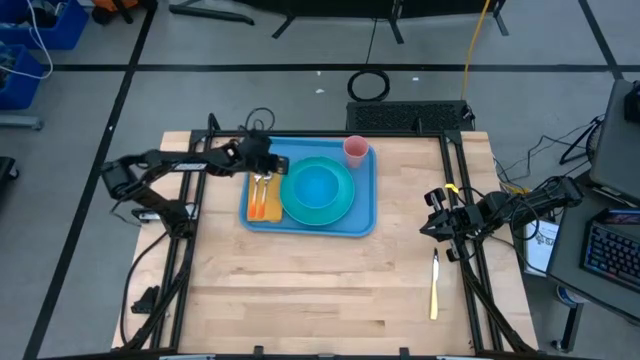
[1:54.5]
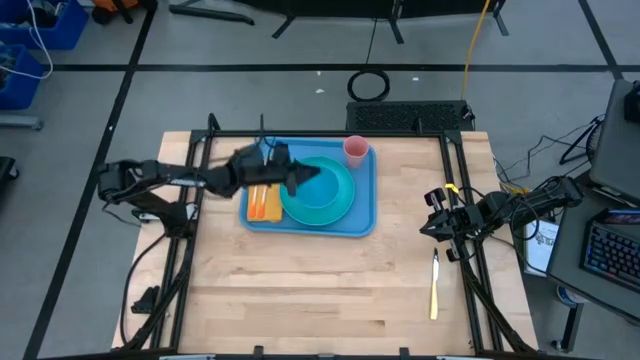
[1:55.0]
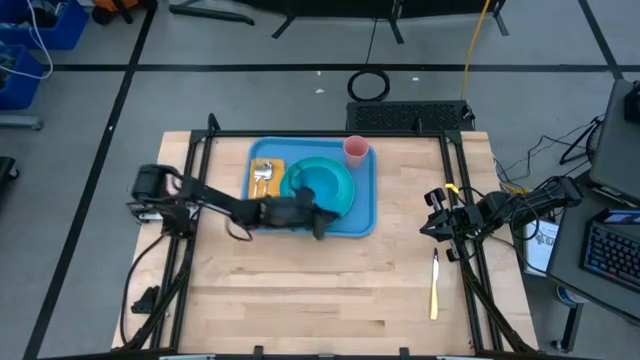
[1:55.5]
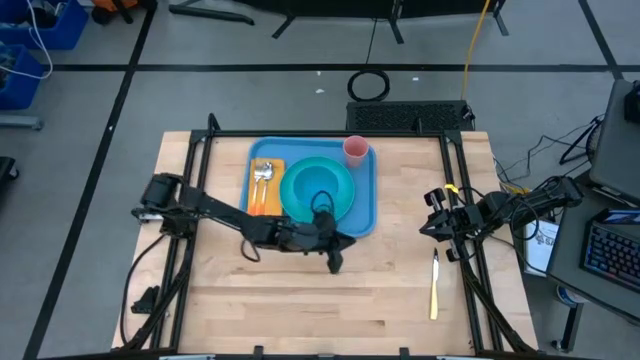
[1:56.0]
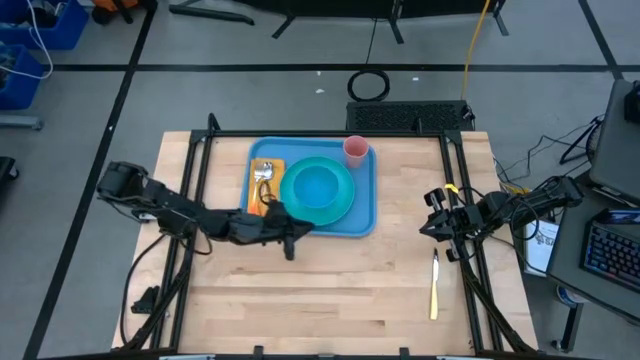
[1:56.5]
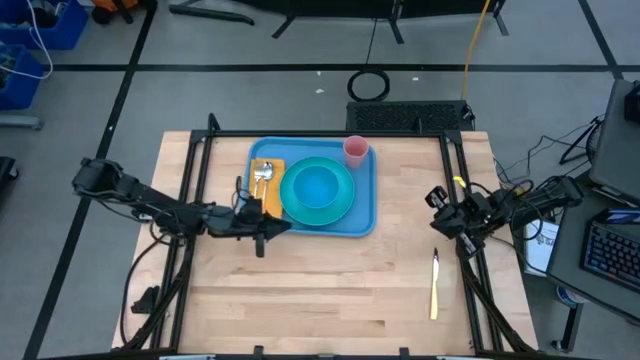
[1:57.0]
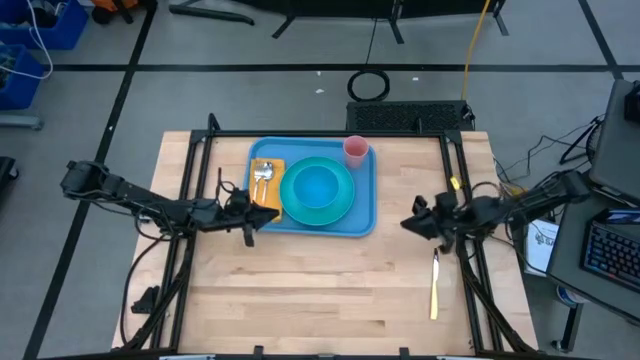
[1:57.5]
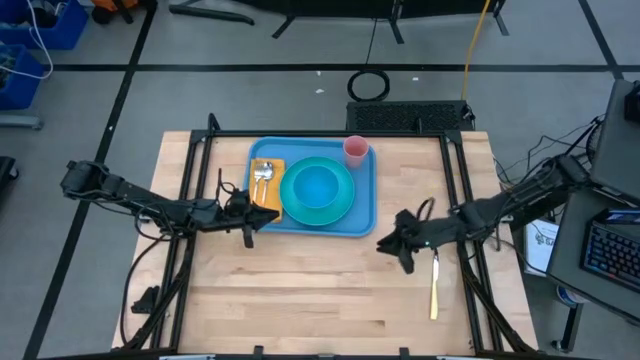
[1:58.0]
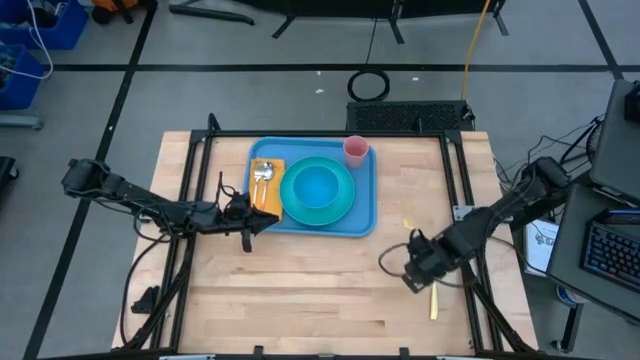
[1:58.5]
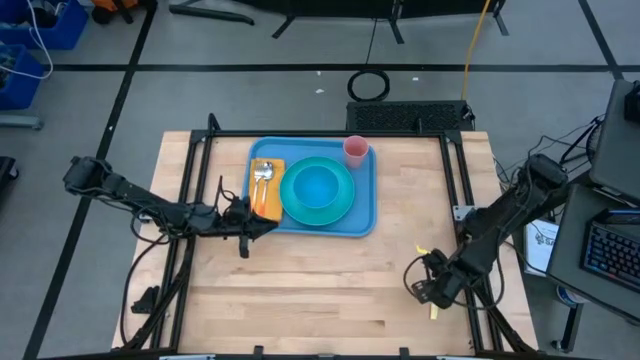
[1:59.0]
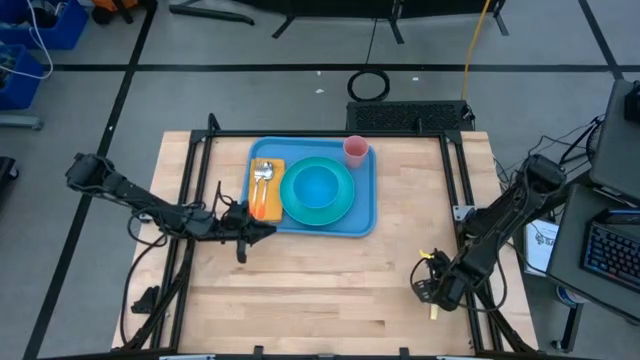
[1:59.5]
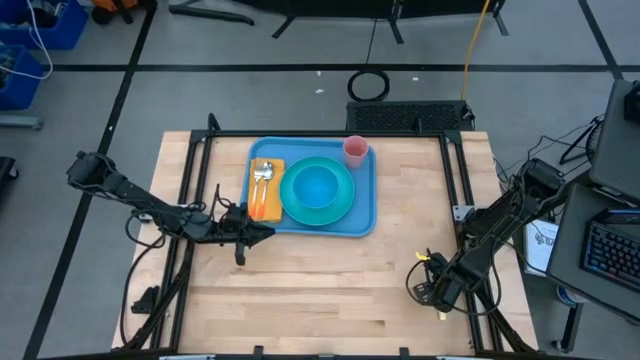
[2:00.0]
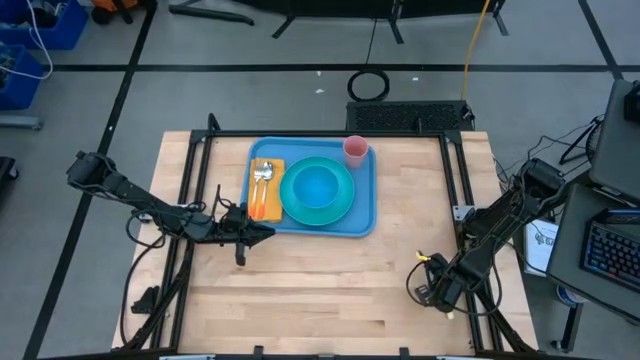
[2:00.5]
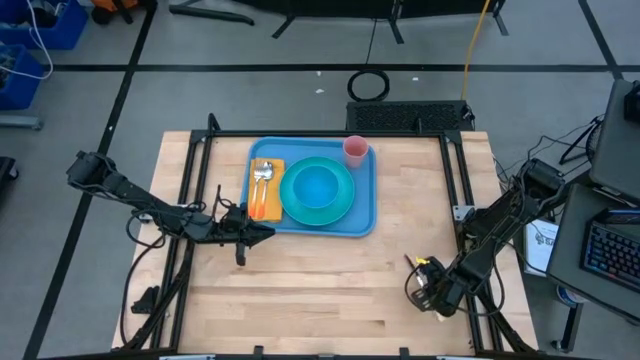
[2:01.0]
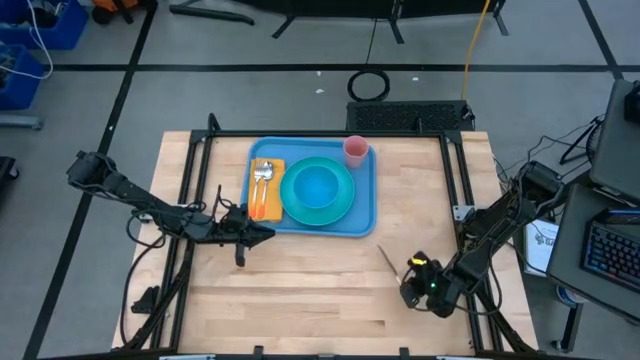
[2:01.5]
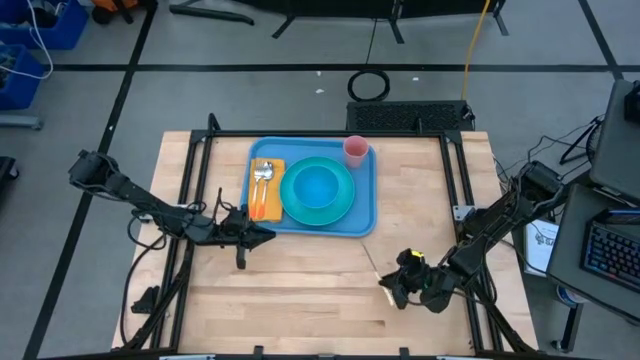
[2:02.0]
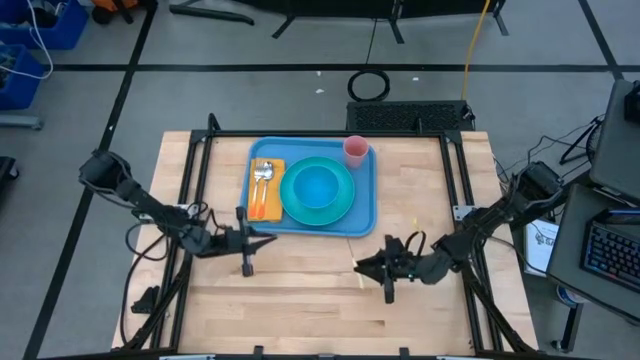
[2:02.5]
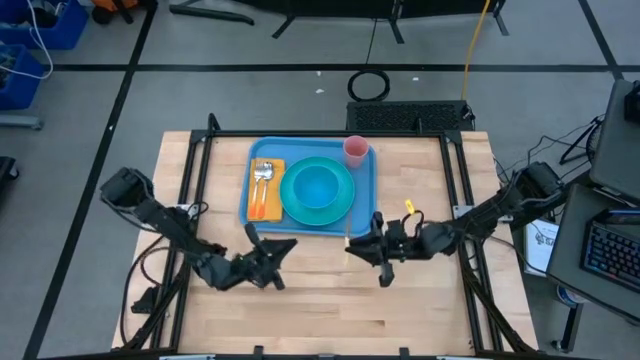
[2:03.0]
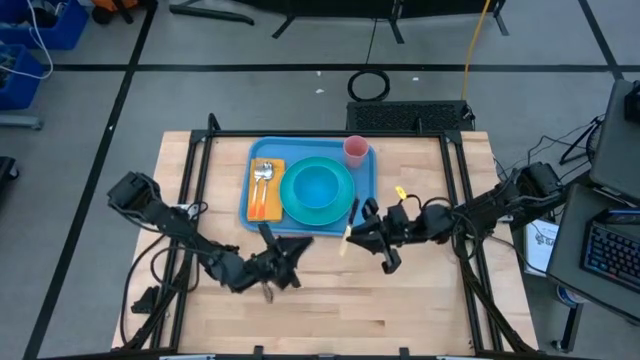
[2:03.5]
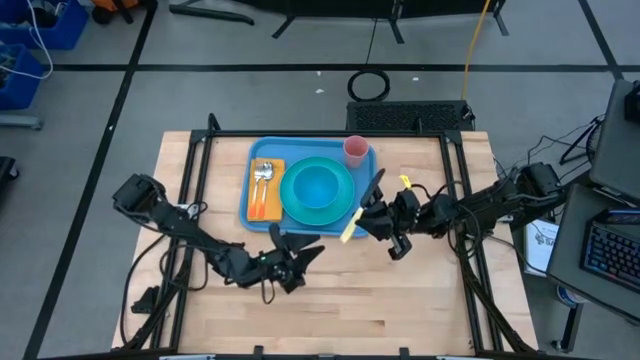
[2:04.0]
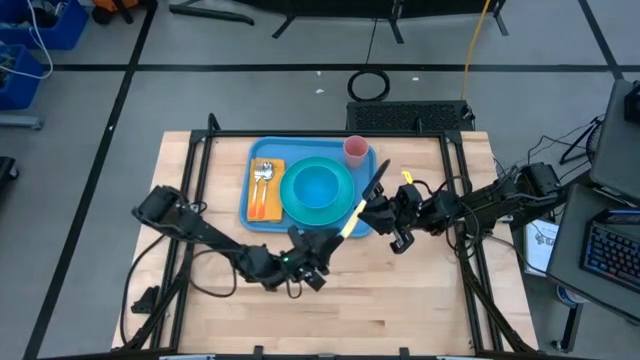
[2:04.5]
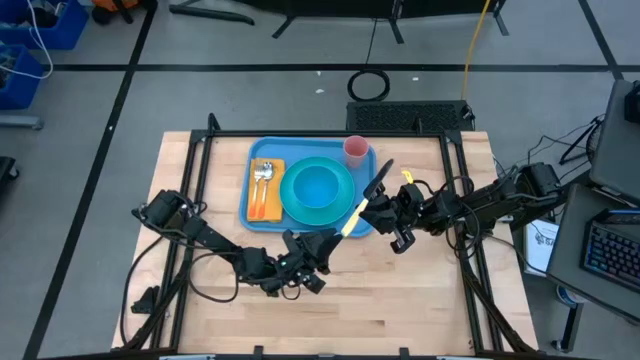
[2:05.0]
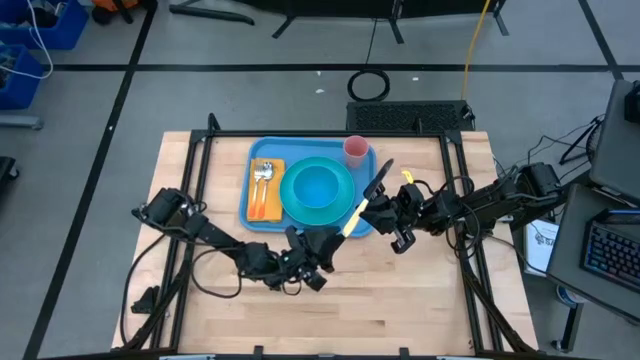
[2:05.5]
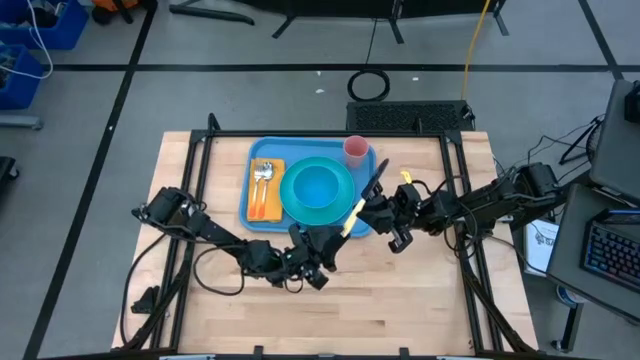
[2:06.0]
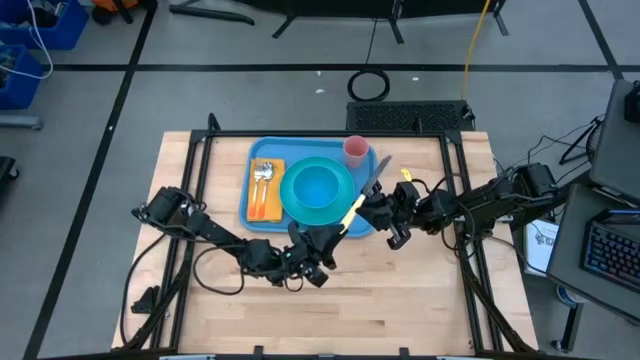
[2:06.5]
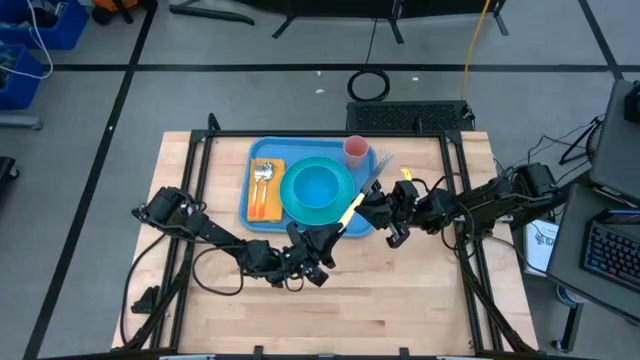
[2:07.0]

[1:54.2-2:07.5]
Task: Set up tray
Put the yellow knife on the yellow napkin to the right of the orange spoon

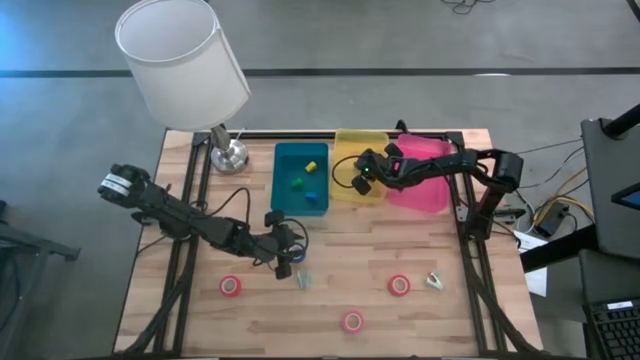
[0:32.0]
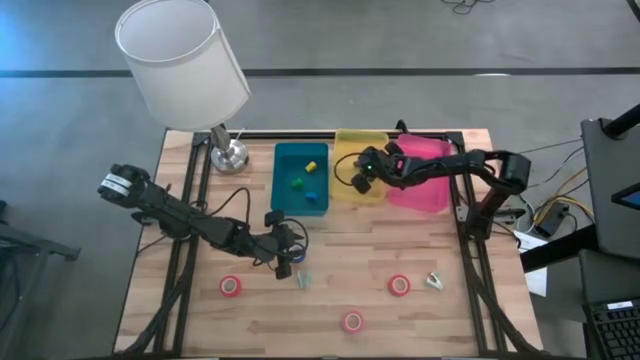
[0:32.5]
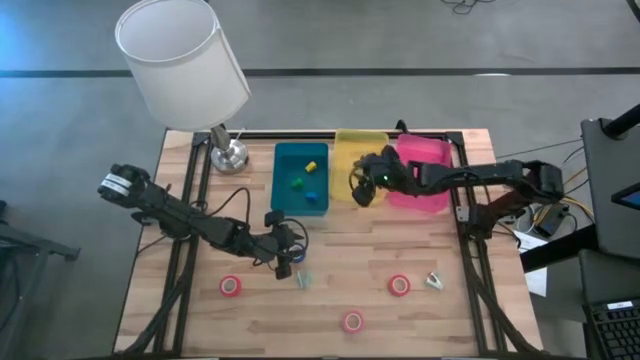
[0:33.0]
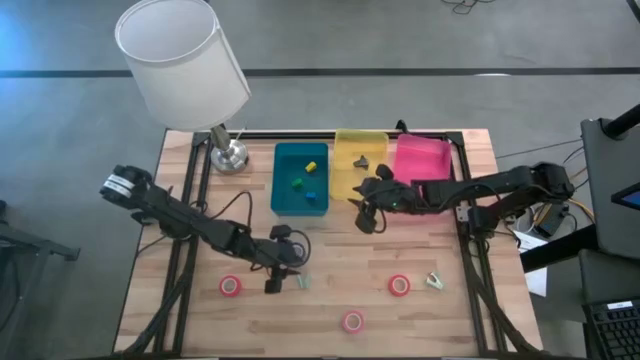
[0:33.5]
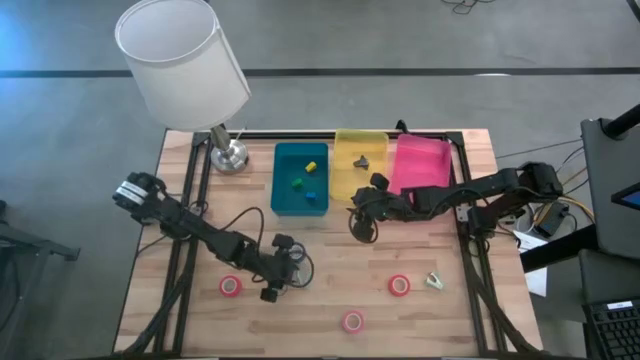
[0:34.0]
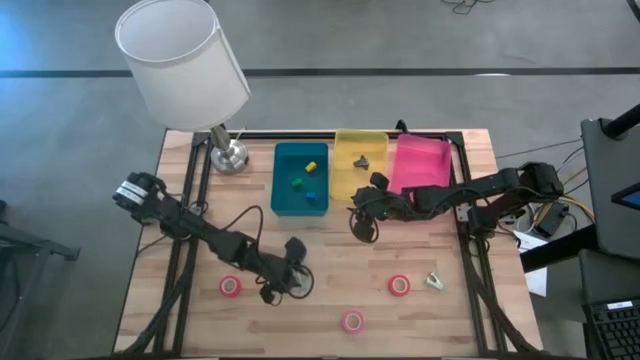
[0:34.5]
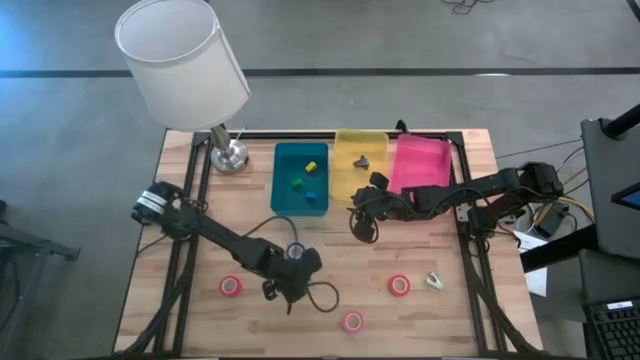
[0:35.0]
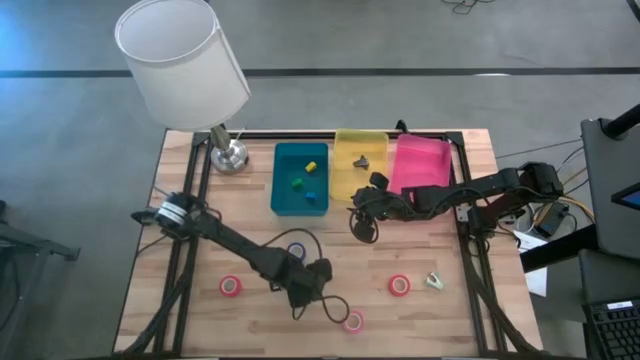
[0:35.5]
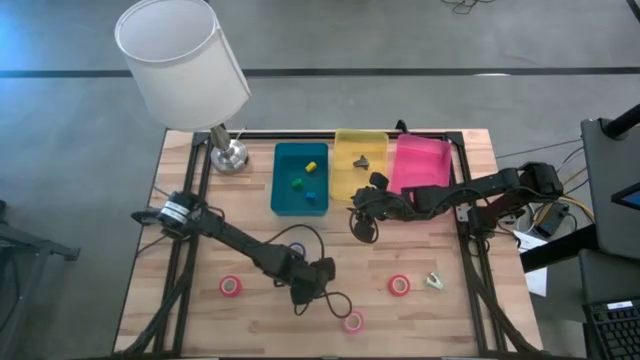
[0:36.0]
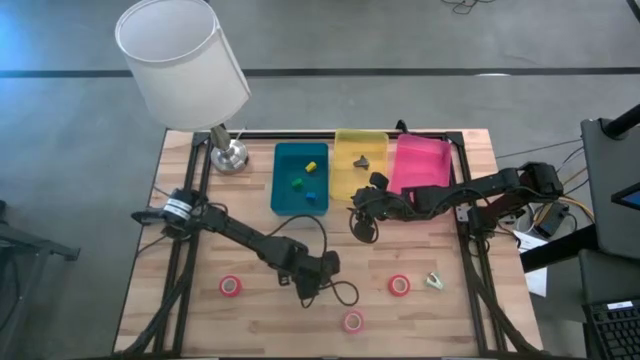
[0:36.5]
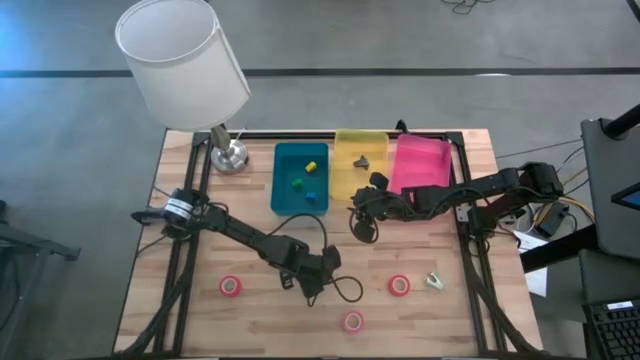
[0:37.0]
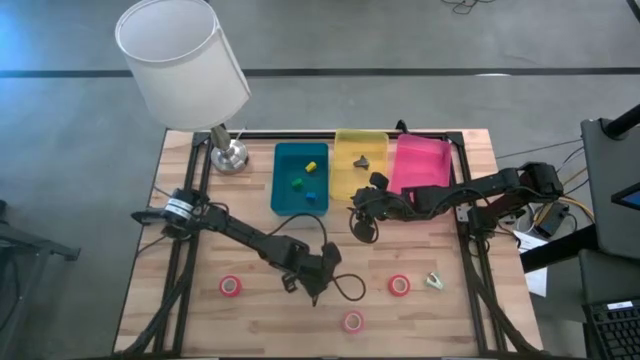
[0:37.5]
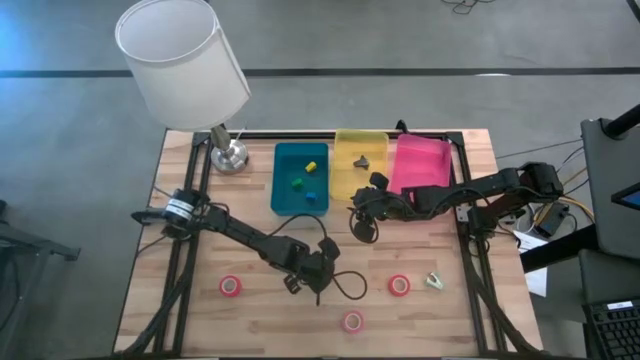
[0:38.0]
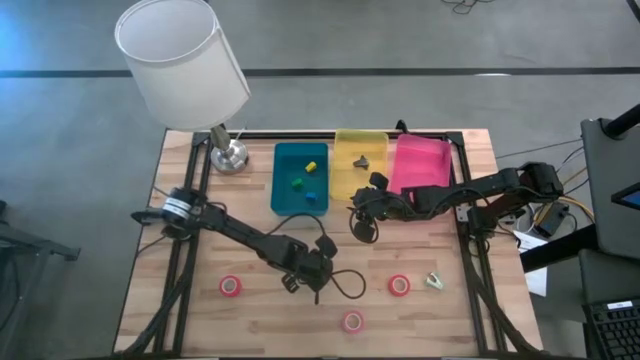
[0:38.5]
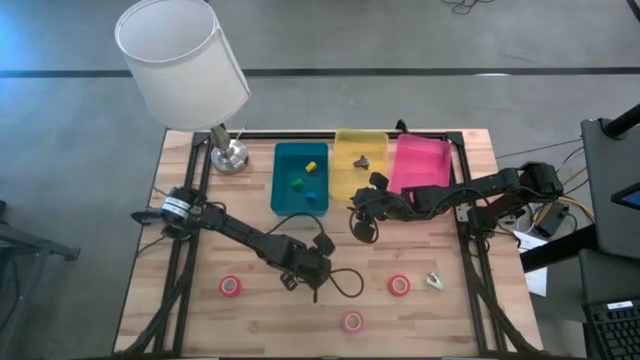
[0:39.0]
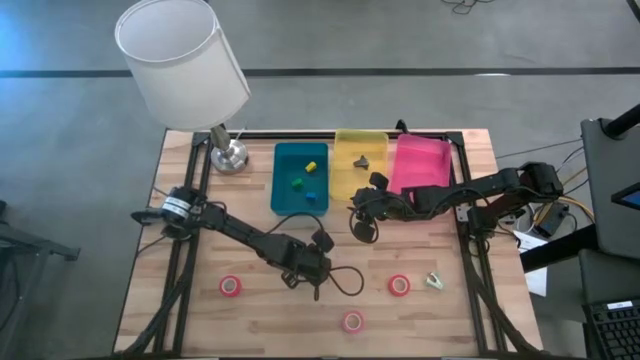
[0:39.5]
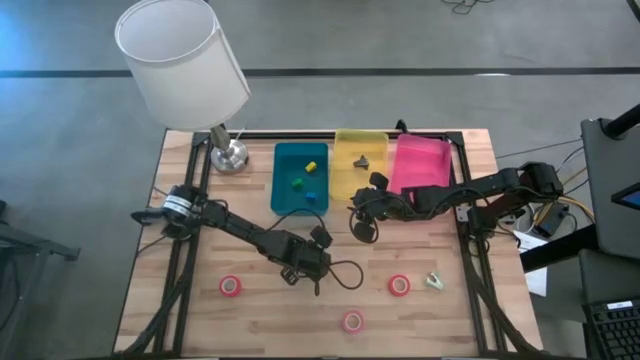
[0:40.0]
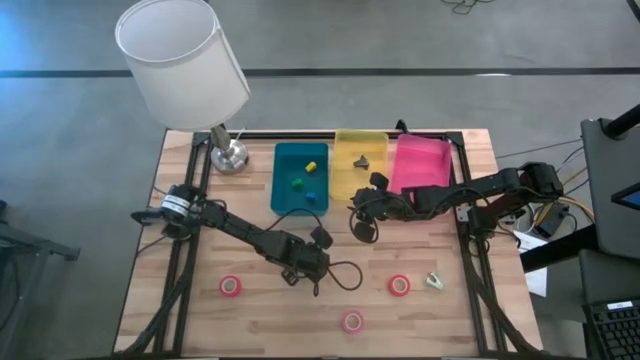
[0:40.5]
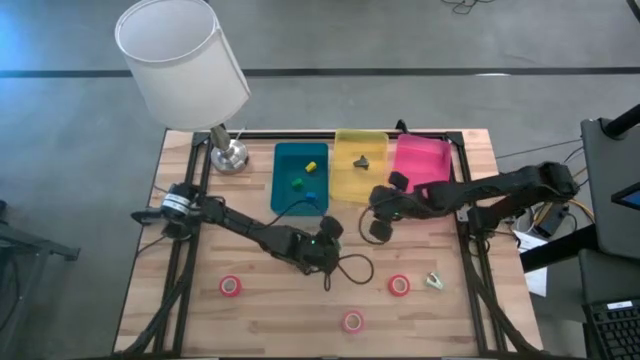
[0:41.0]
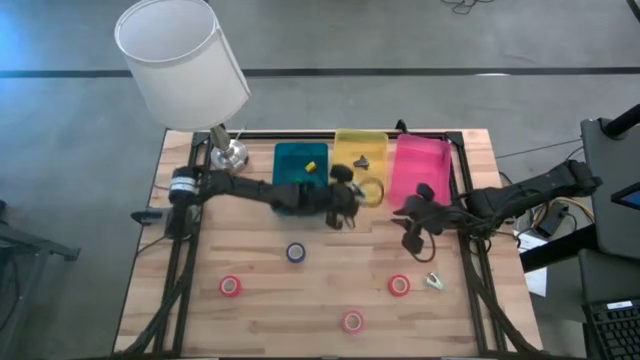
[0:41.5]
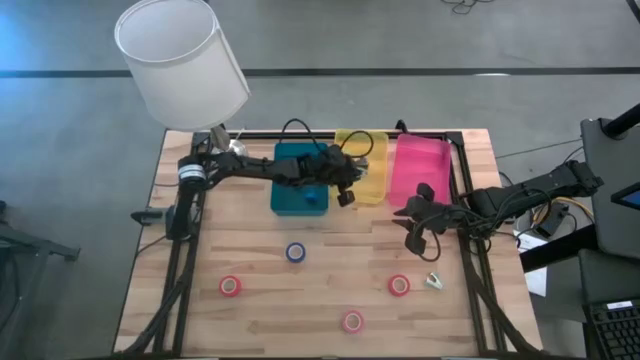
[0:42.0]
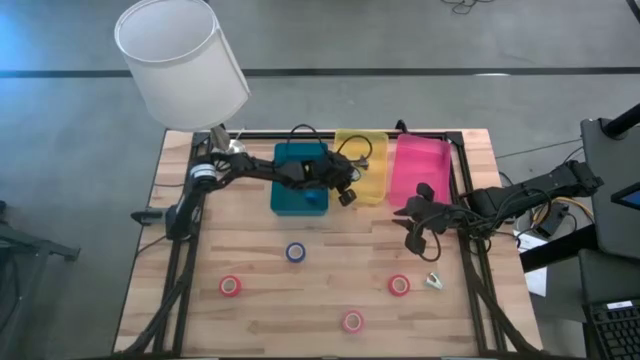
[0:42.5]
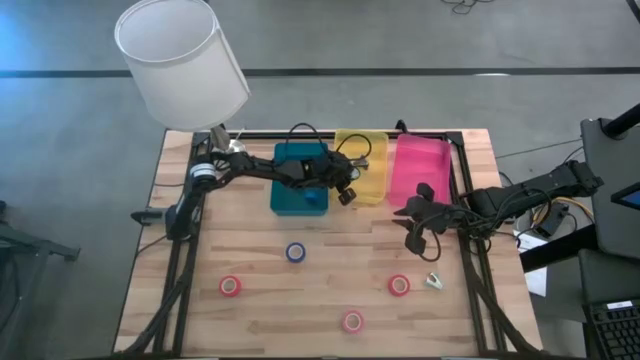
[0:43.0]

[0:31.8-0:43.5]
Task: Pick and place Stapler, Stapler remover, tape
Put the blue staple remover into the yellow bin
